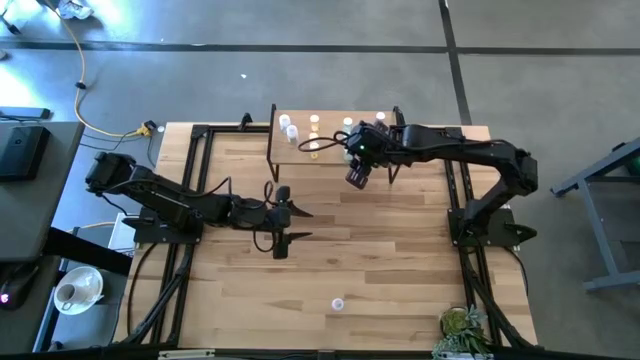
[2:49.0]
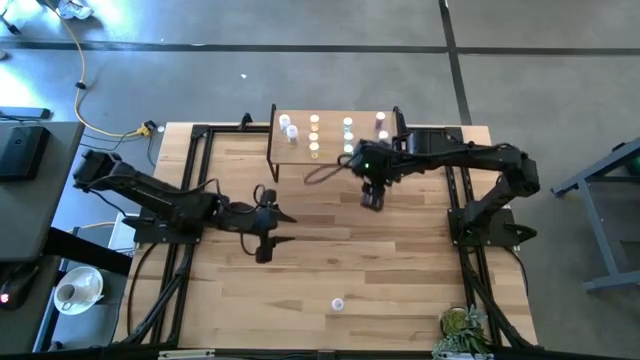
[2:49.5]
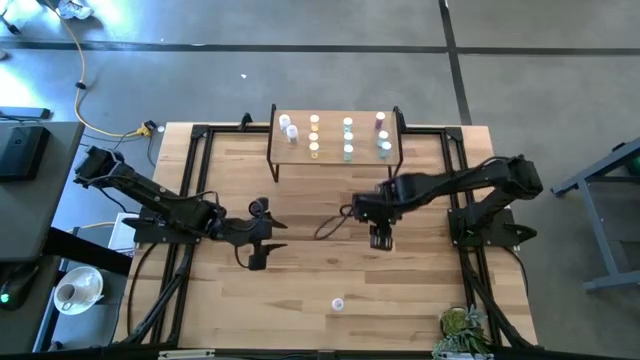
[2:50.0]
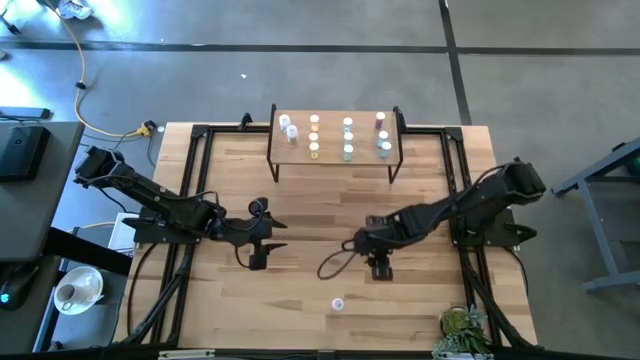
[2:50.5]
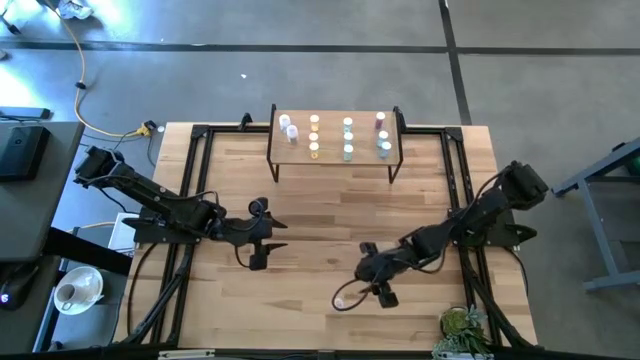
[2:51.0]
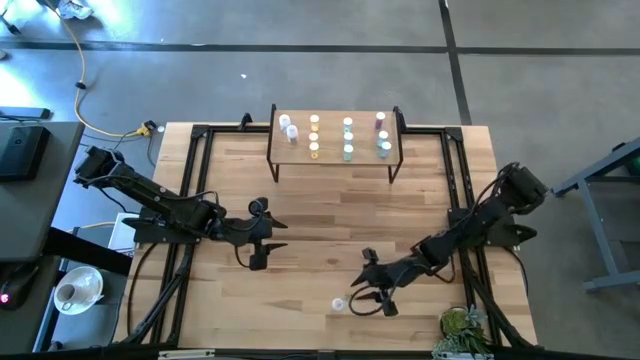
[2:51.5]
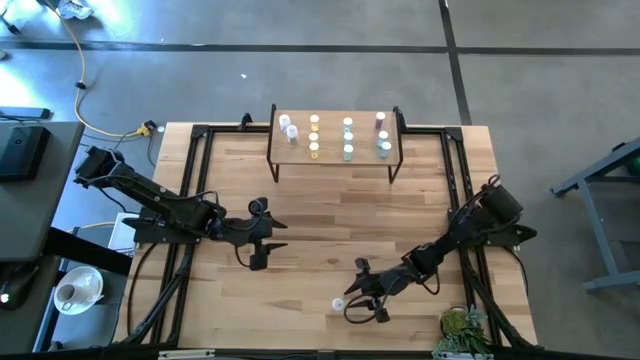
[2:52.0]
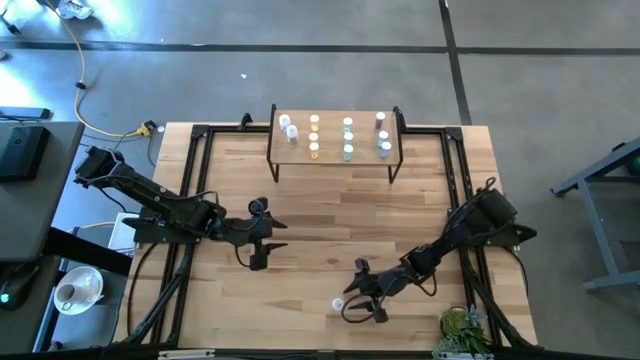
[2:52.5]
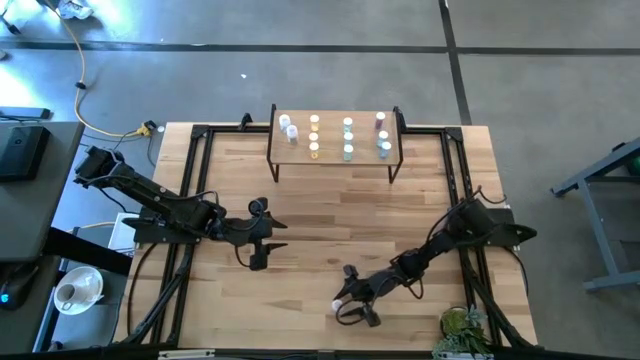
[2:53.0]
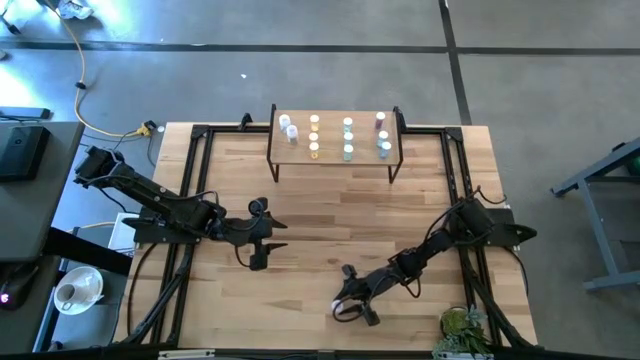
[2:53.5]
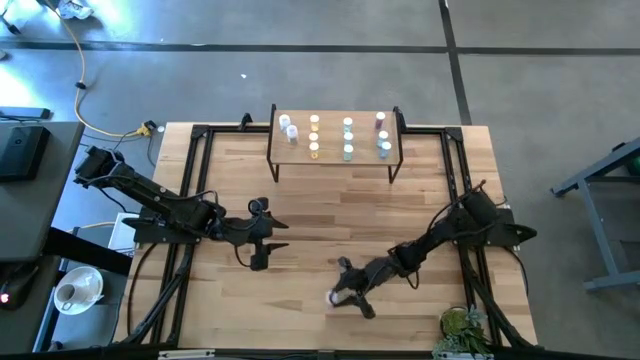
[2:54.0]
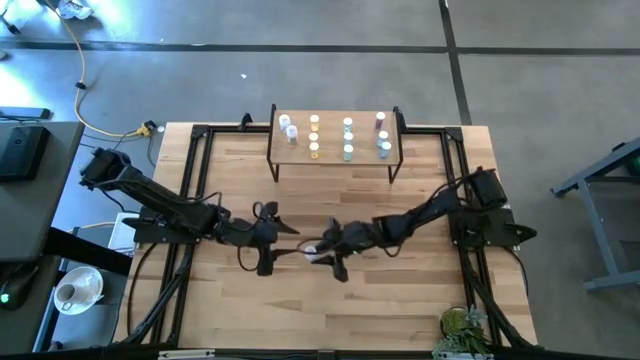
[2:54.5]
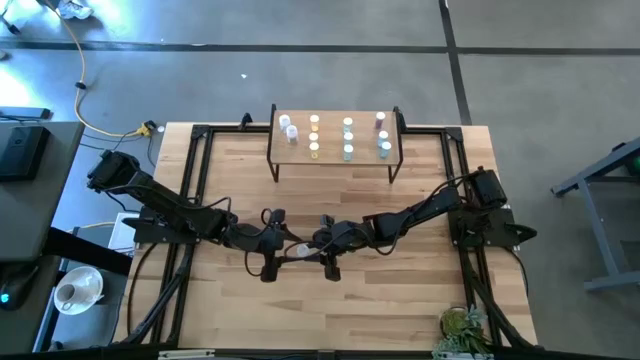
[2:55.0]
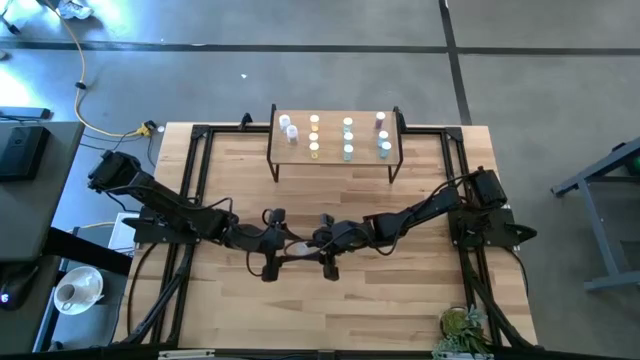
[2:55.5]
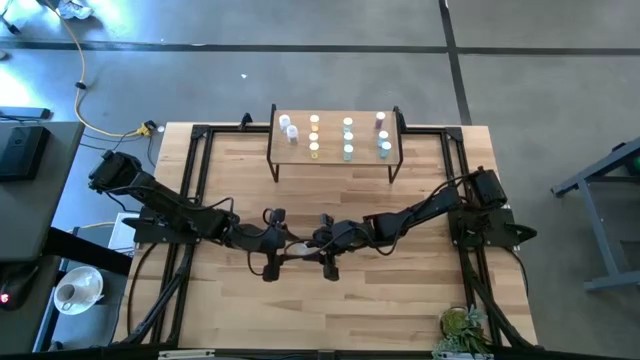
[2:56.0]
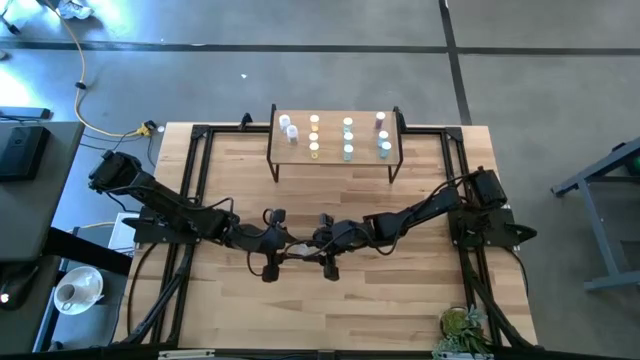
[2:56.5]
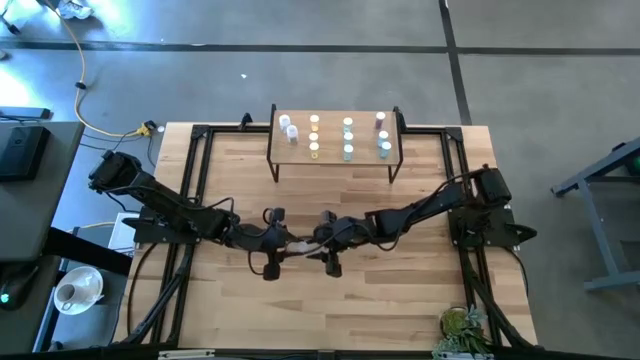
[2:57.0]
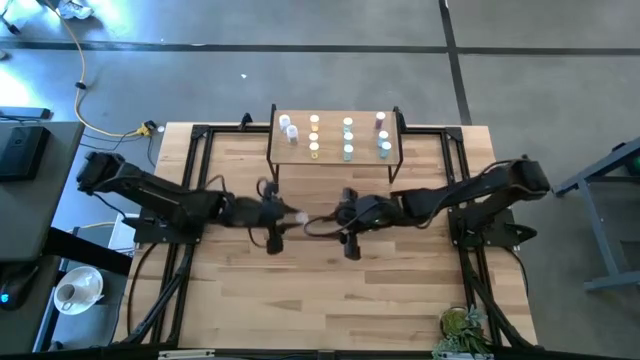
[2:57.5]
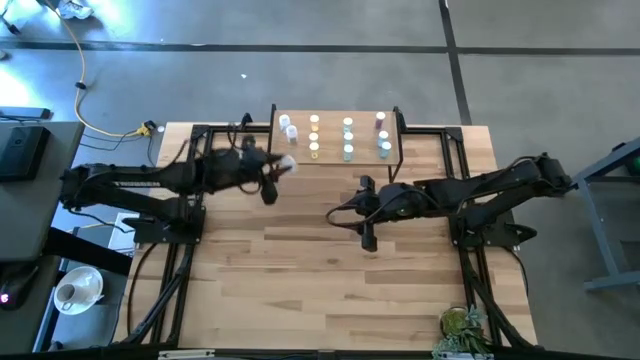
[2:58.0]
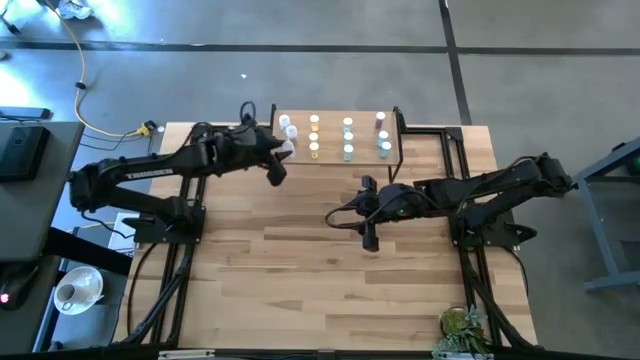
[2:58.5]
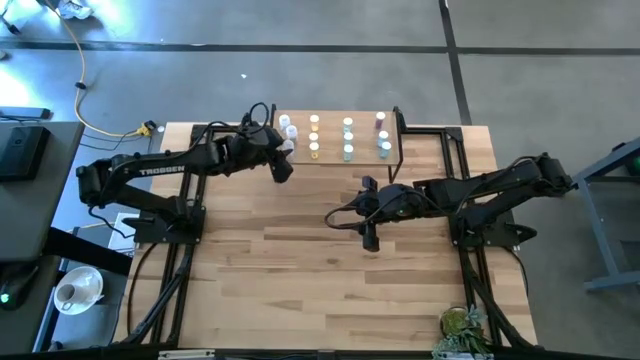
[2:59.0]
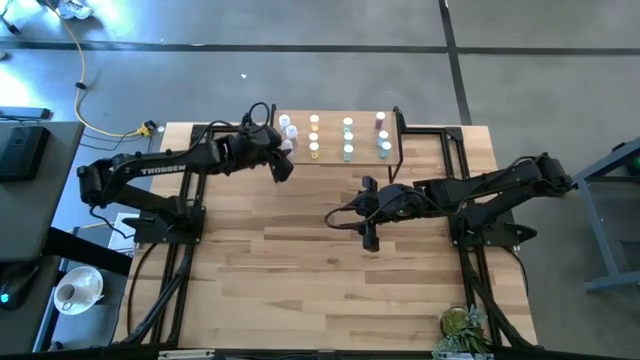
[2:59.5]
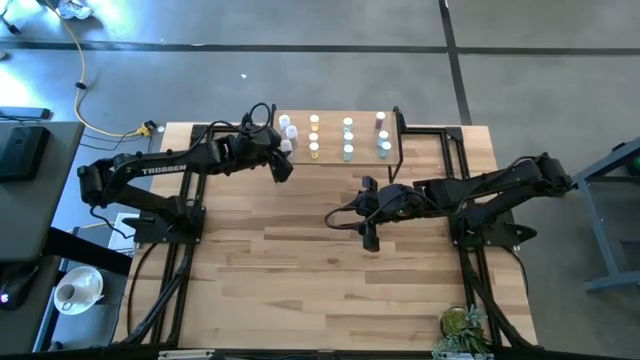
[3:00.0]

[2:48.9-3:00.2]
Task: Pick and place medicine bottles onto shelf by color
Put the white pill bottle on the shelf aligned with the other white pill bottles

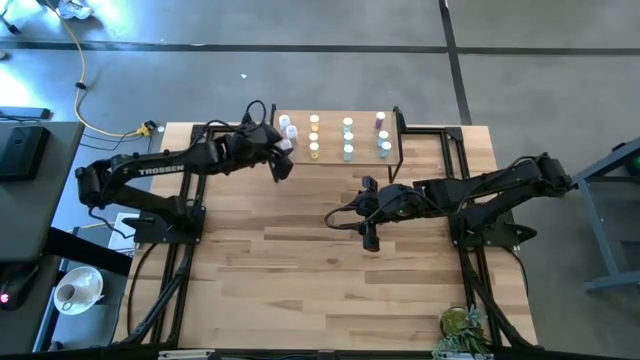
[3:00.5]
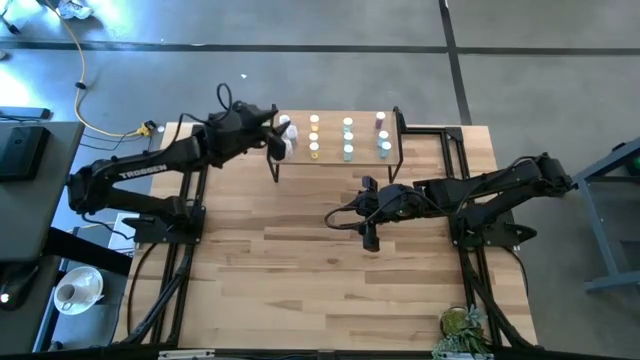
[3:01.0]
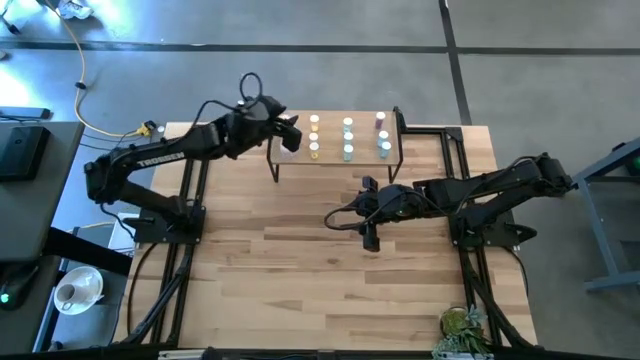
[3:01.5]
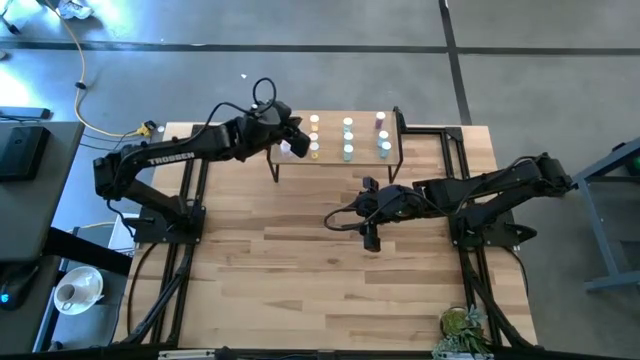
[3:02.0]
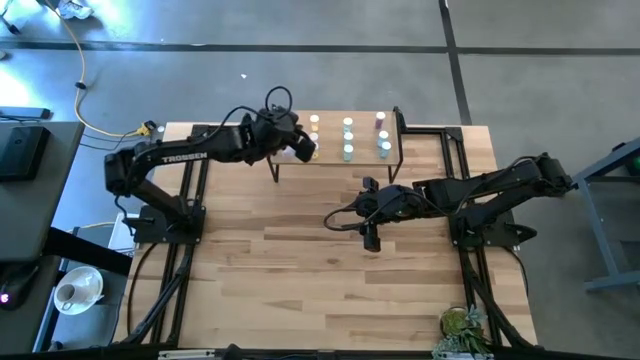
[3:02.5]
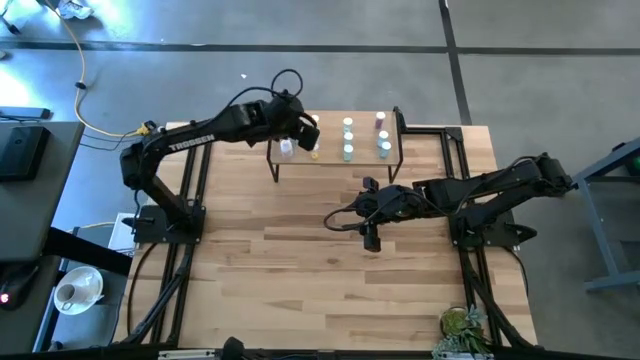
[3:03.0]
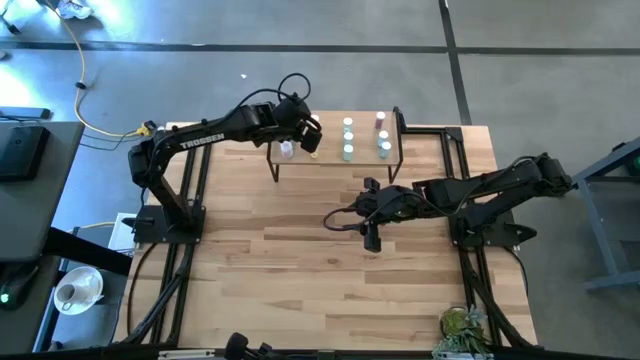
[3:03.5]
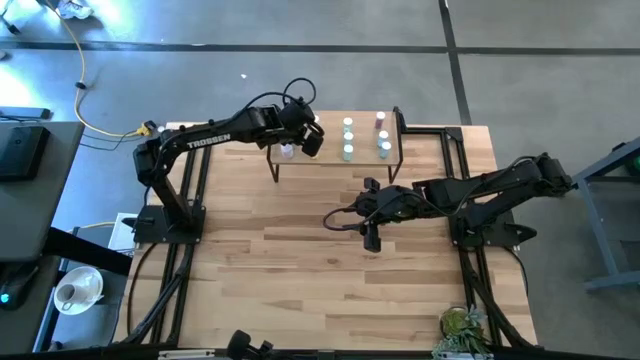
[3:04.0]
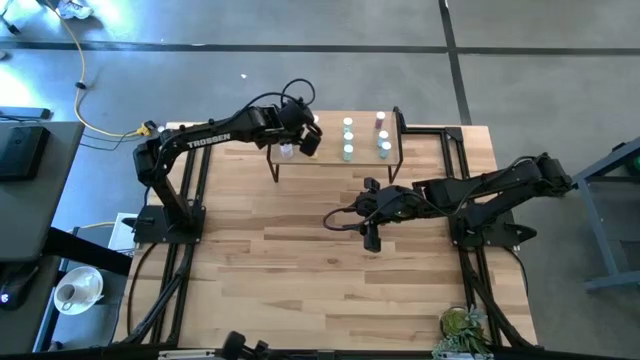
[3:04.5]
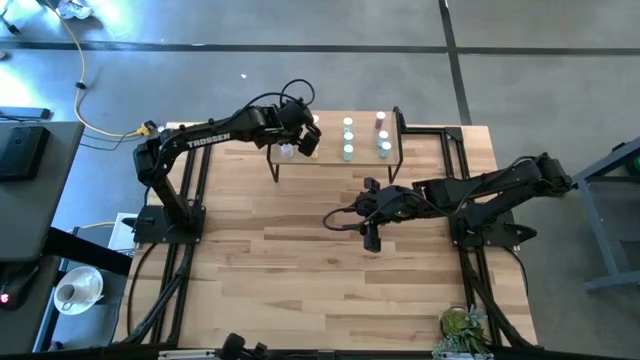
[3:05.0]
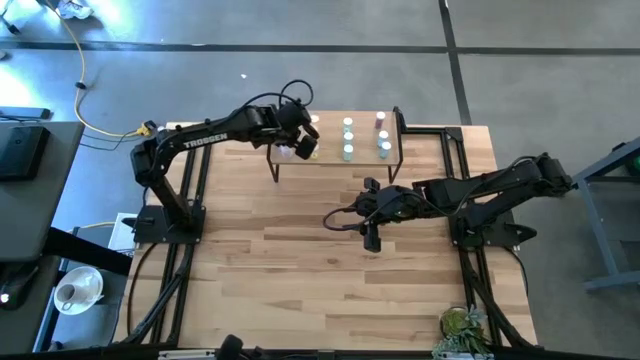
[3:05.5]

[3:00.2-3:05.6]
Adjust the middle white pill bottle on the shelf

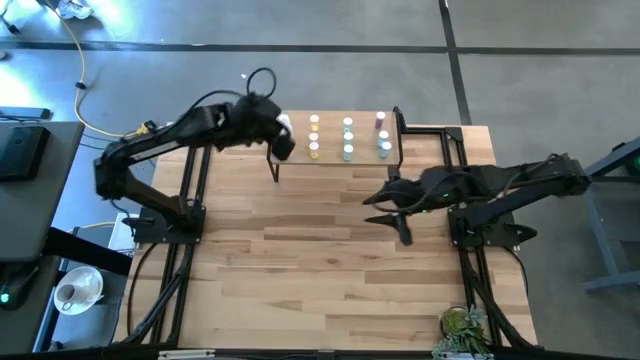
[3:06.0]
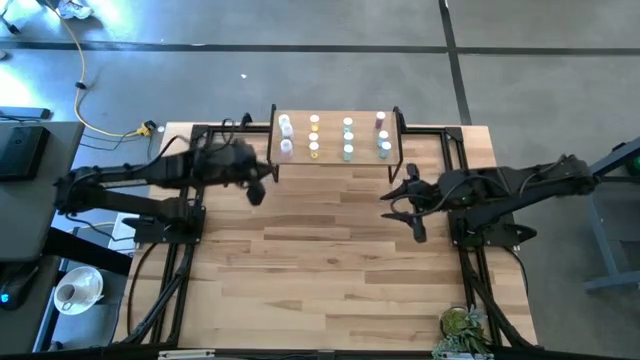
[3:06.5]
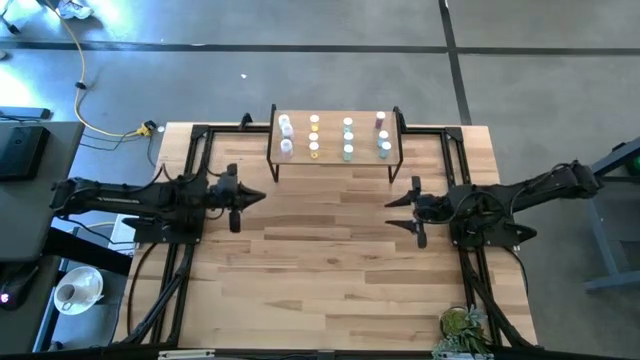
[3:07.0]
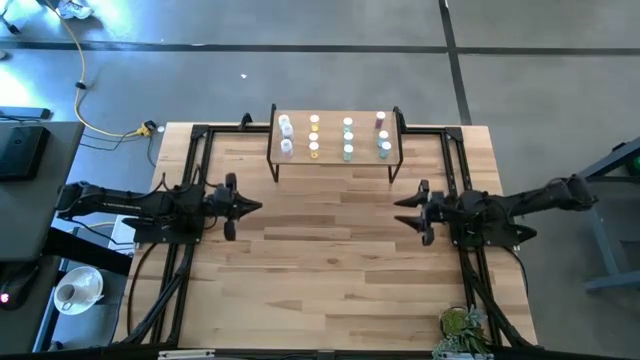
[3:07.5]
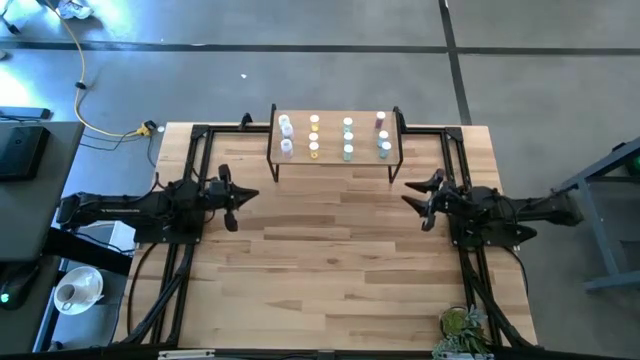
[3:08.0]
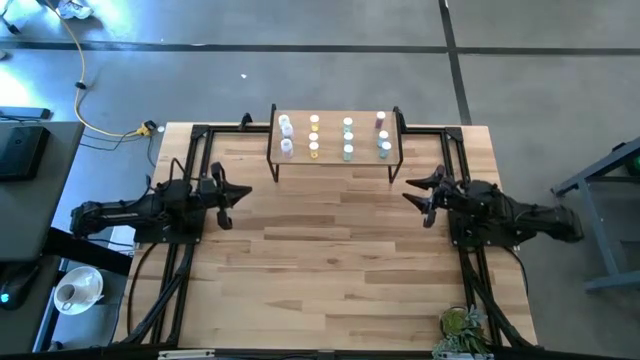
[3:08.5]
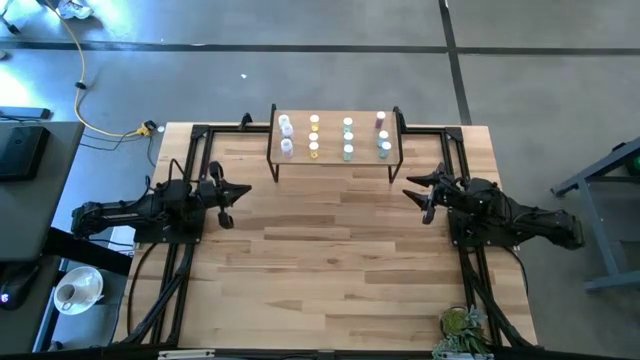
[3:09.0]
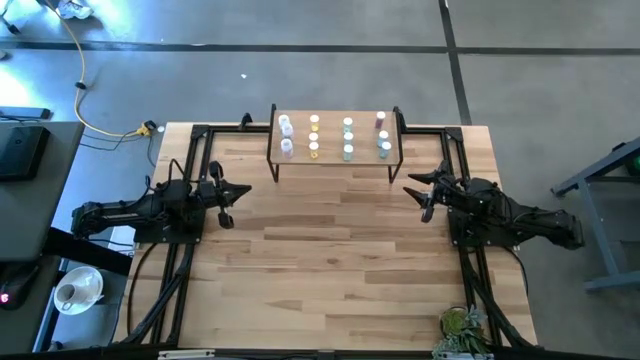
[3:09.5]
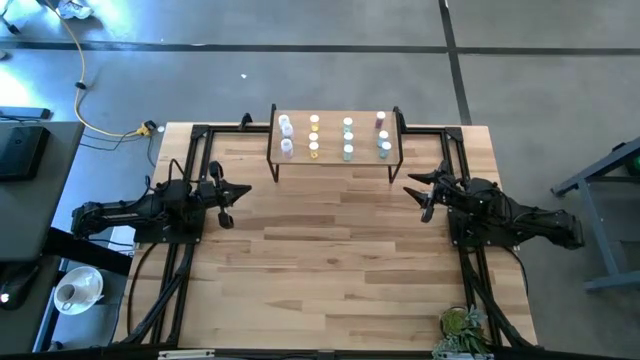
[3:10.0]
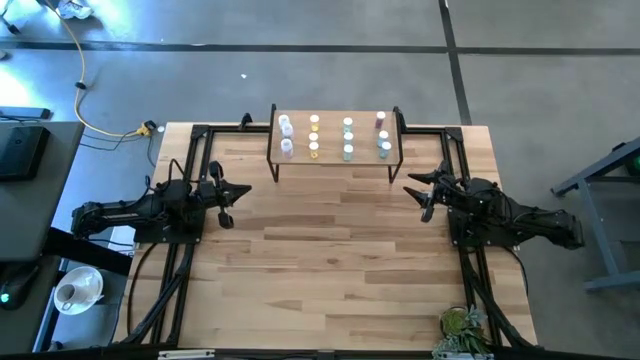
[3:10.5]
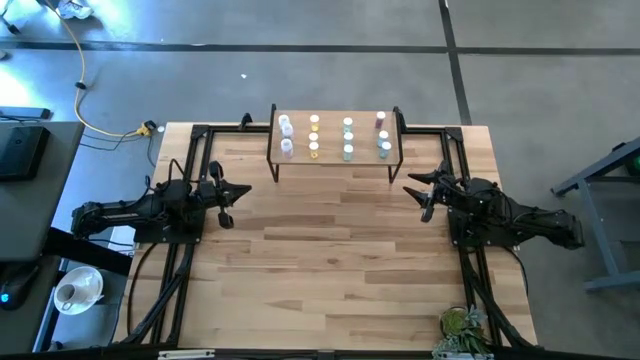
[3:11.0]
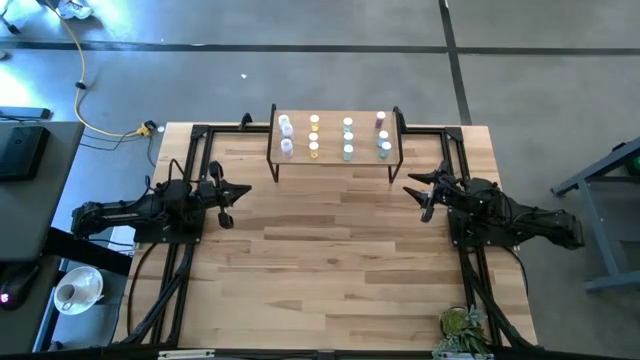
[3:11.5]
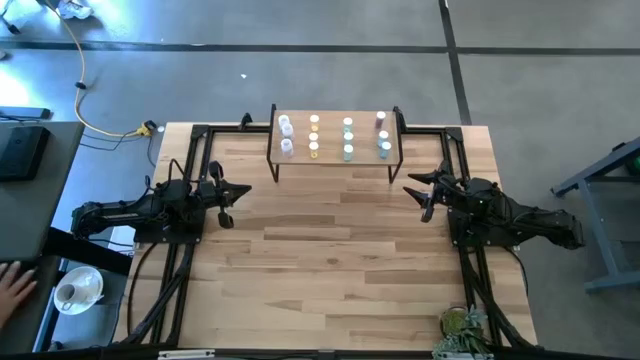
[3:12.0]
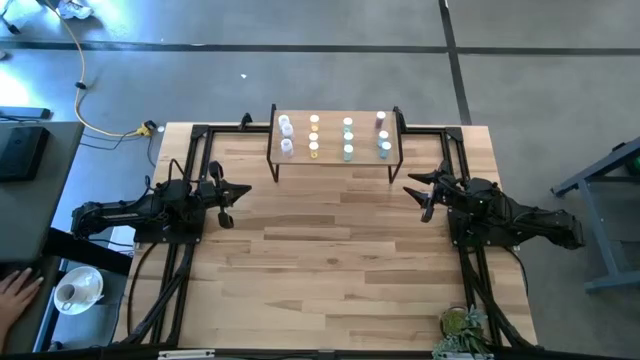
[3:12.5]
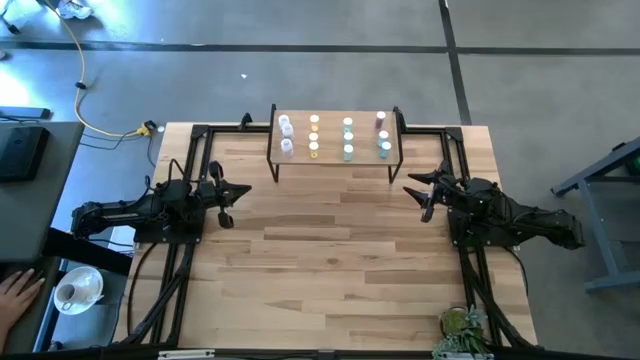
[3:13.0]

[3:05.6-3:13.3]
Return to Home Position
